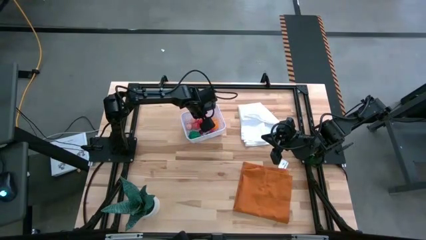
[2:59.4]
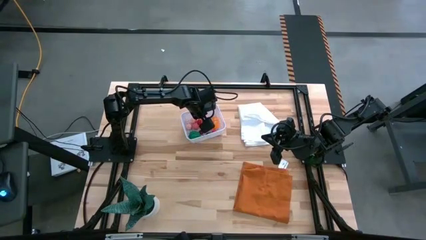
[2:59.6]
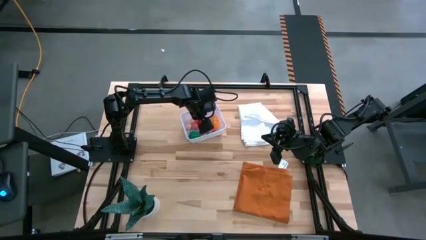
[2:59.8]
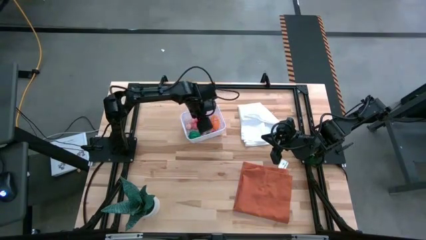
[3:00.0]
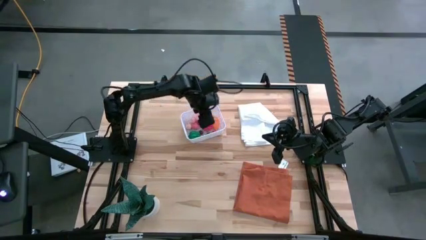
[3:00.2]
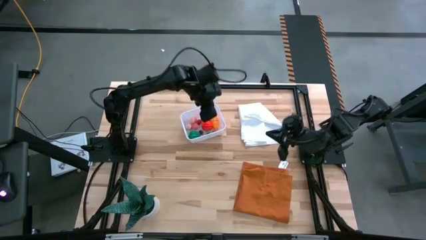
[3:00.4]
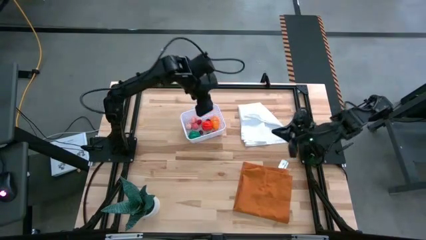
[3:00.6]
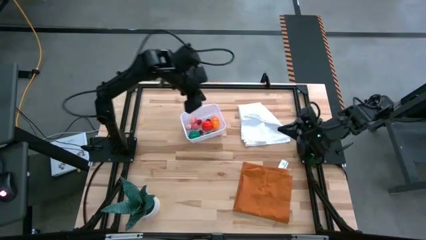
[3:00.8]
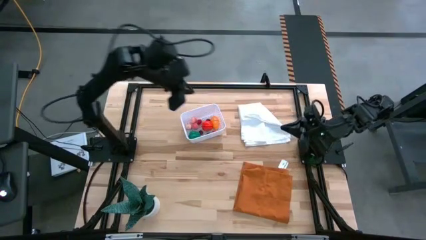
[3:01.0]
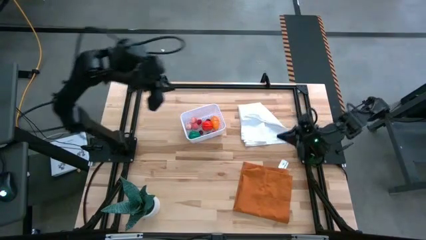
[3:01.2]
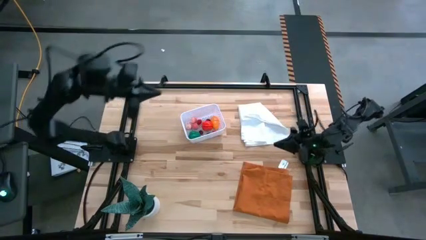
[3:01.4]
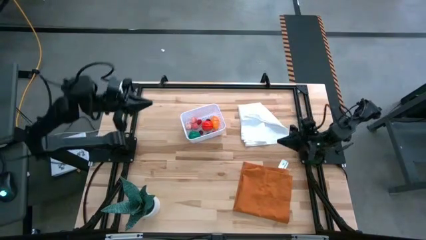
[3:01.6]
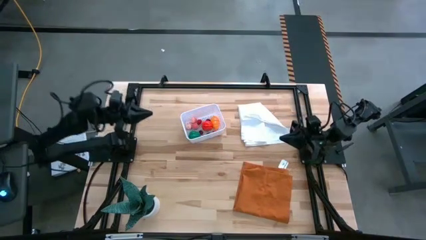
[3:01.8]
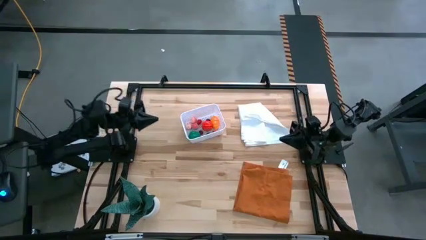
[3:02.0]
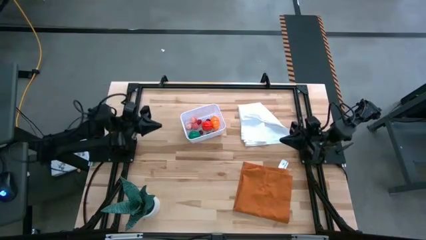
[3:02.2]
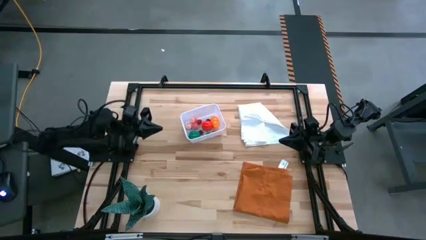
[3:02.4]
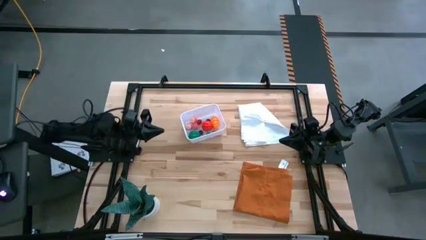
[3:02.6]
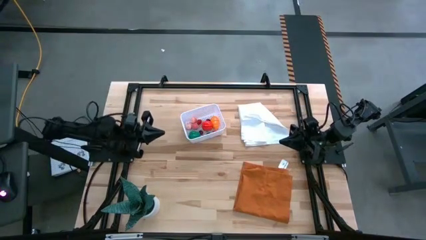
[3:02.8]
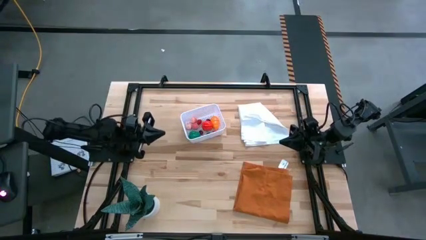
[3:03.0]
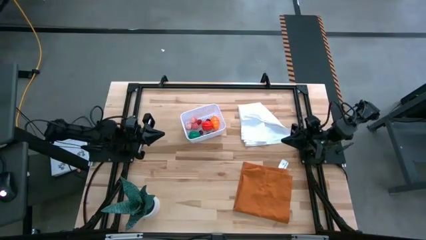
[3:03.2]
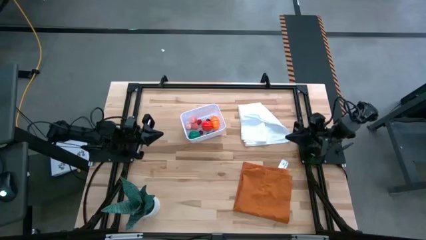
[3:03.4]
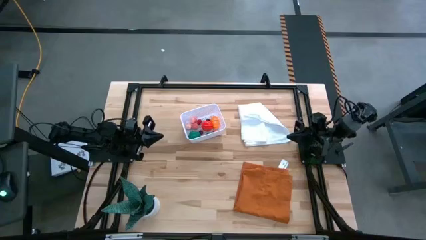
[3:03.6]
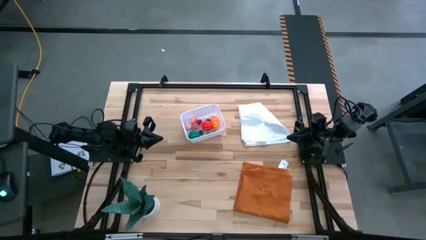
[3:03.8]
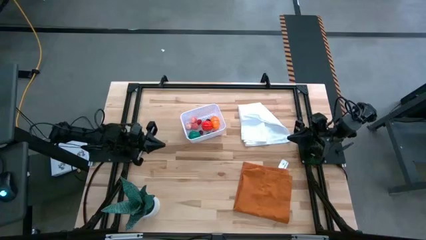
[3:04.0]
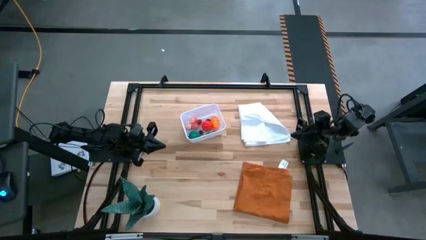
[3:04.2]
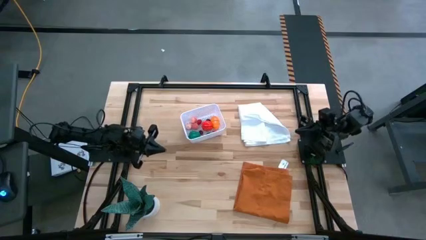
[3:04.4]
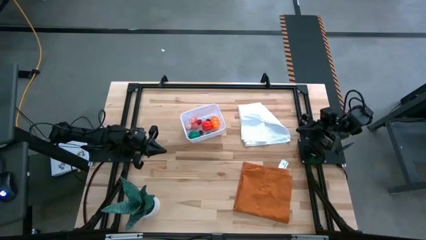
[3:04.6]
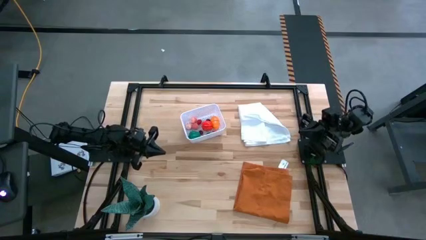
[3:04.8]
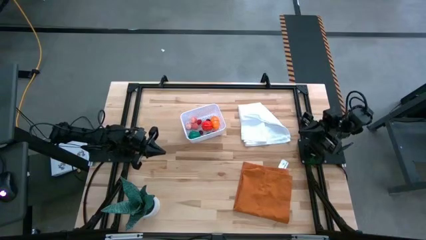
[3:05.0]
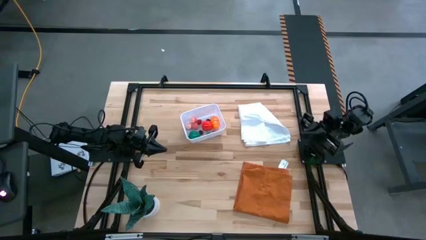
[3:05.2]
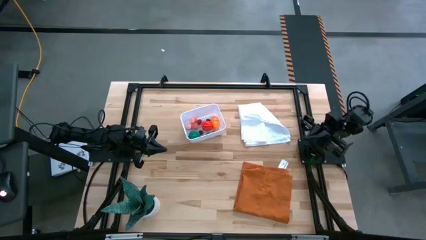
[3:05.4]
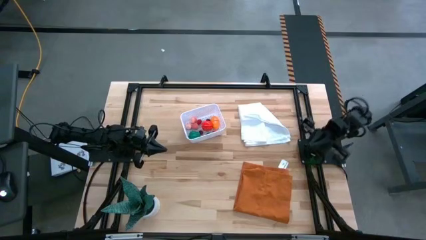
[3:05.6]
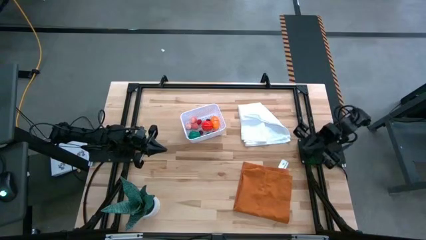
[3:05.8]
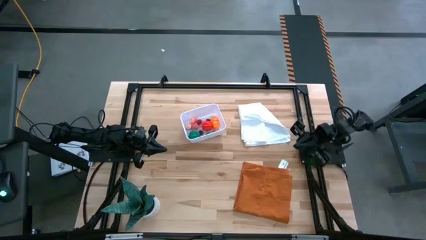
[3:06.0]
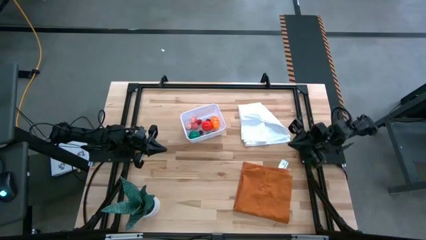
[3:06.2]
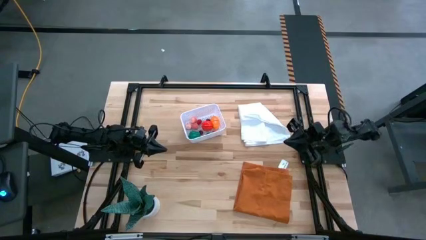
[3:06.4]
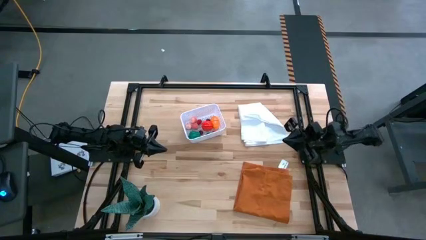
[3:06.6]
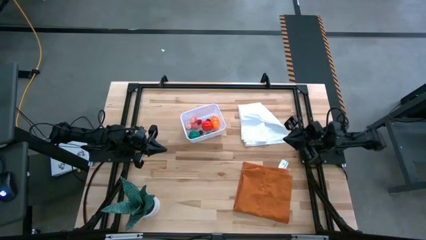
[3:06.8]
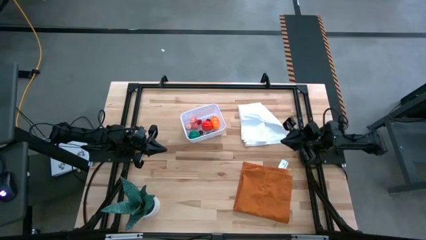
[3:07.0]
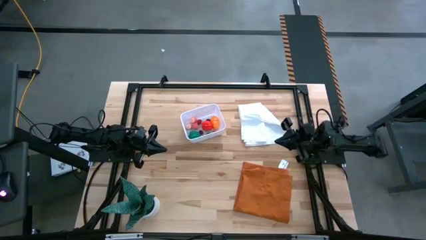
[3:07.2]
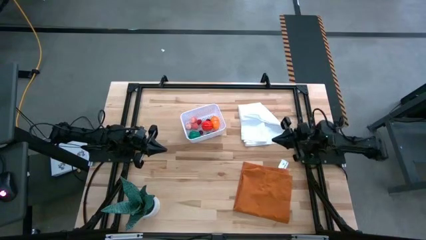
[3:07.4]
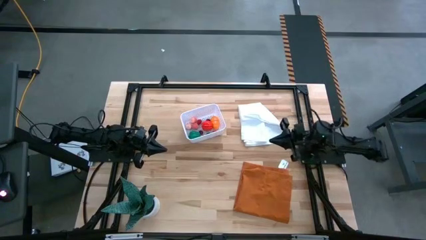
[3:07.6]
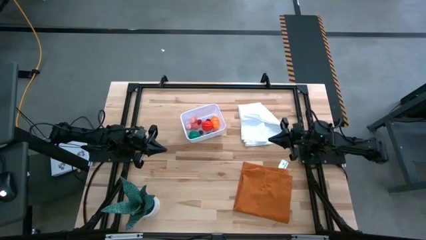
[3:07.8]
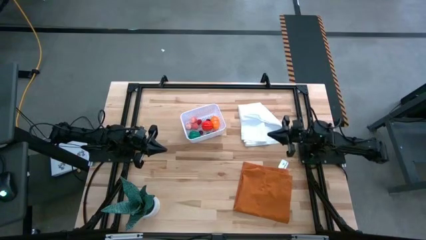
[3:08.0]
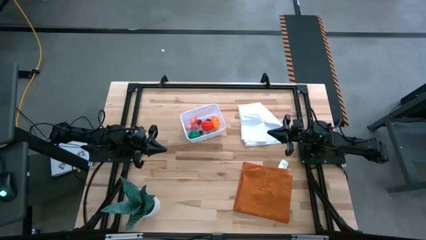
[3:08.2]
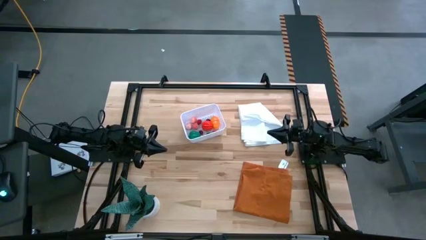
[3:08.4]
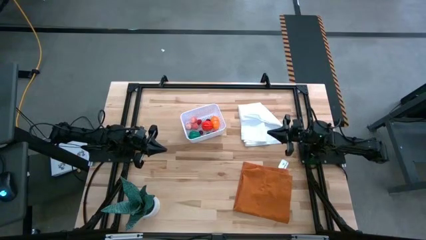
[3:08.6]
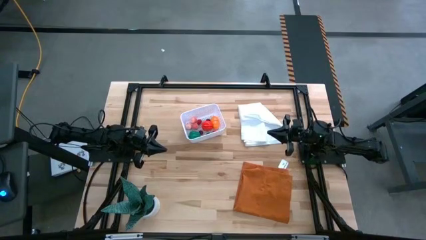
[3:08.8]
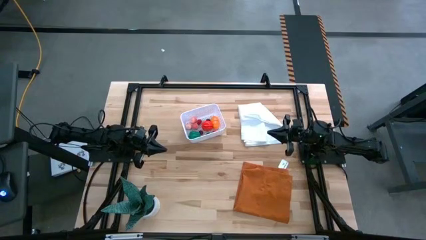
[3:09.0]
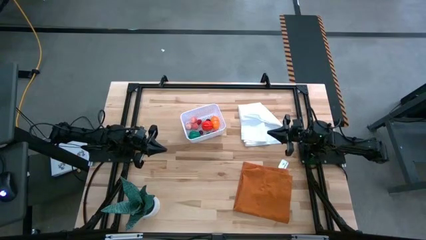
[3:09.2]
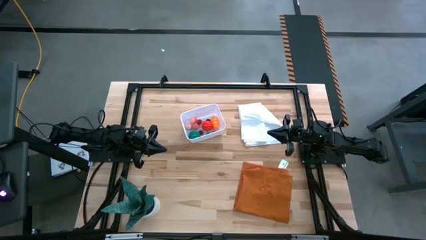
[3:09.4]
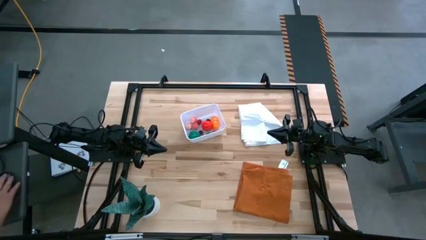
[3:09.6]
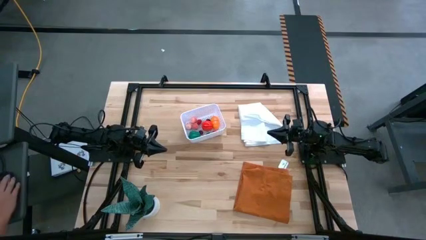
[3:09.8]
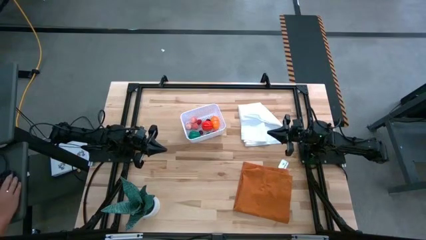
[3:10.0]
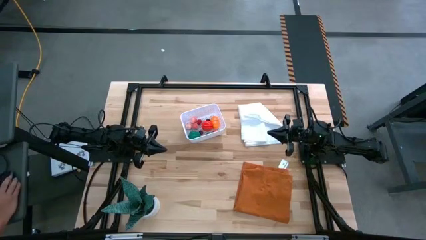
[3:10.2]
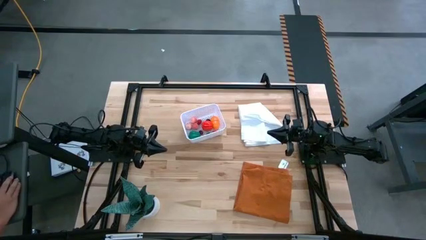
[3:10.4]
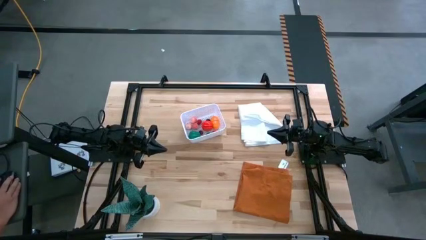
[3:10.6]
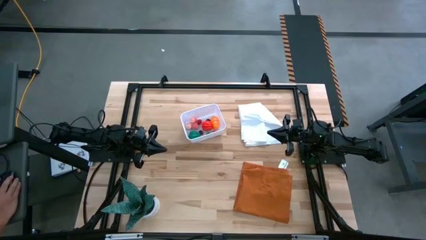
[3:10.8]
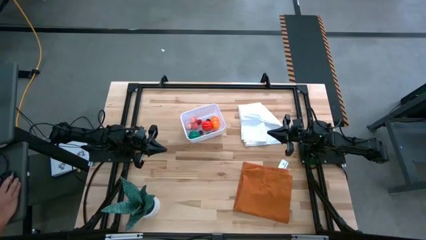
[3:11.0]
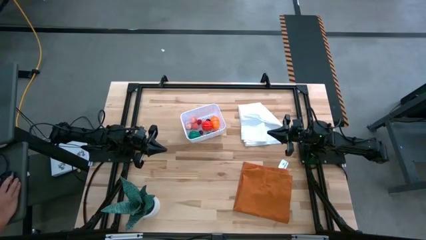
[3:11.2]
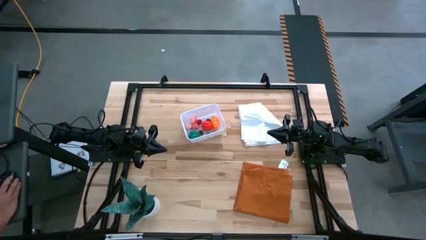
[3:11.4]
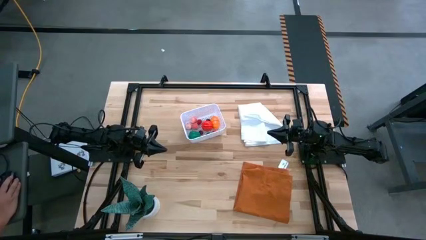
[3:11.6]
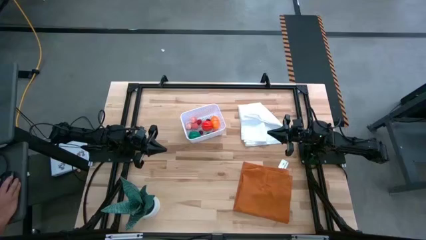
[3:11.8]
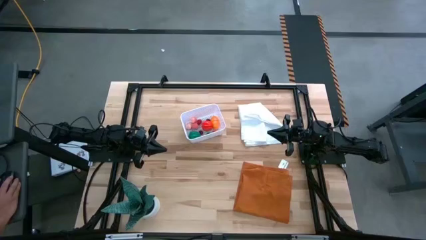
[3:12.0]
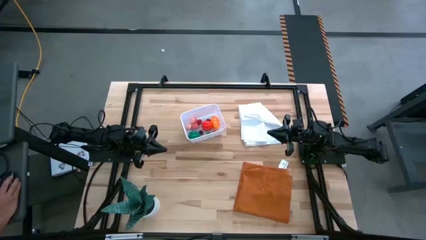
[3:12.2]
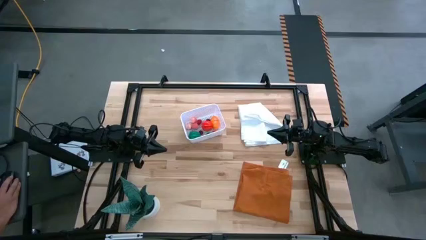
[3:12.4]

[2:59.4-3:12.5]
Task: Pick and placing Produce into tupperware
Return to Home Position

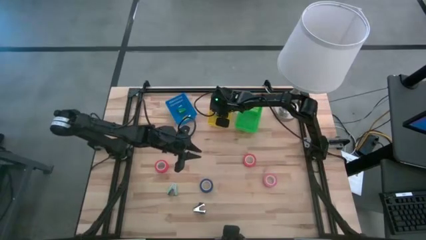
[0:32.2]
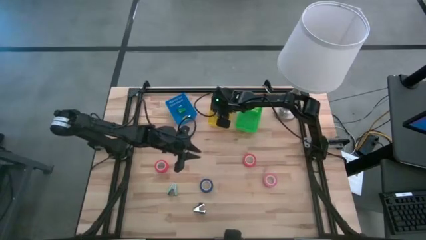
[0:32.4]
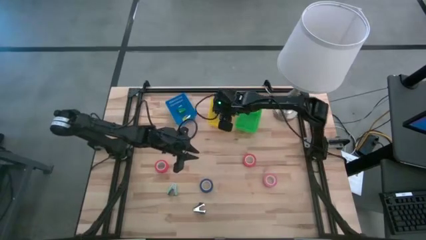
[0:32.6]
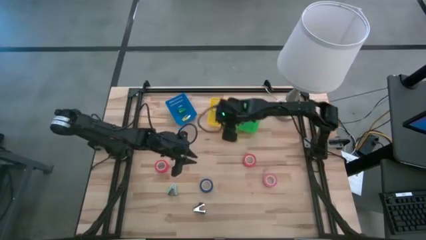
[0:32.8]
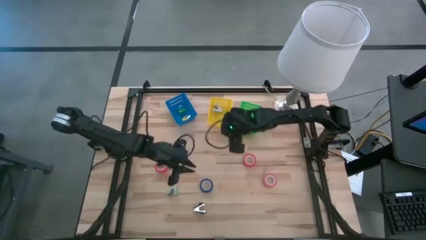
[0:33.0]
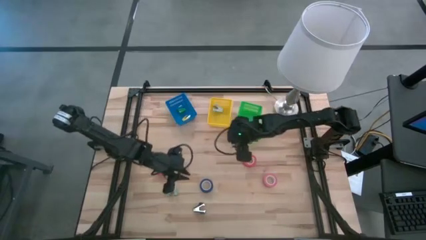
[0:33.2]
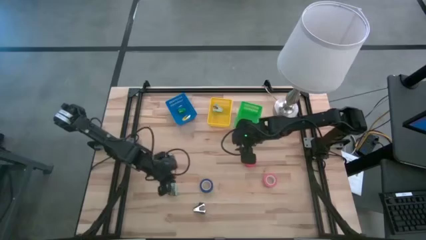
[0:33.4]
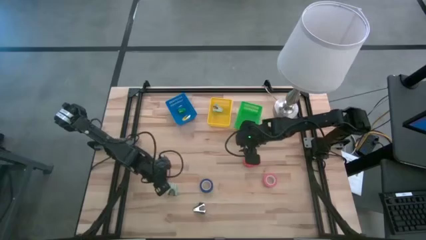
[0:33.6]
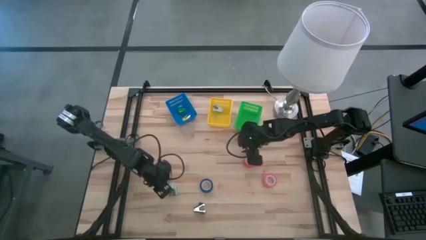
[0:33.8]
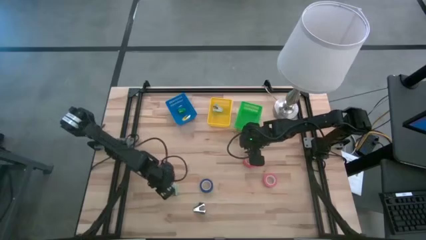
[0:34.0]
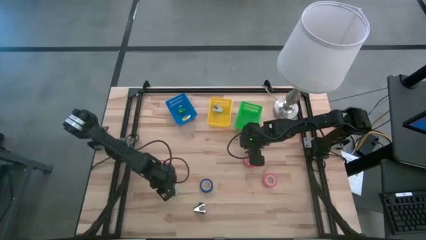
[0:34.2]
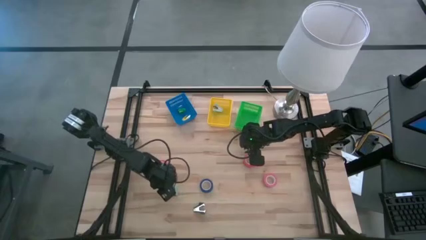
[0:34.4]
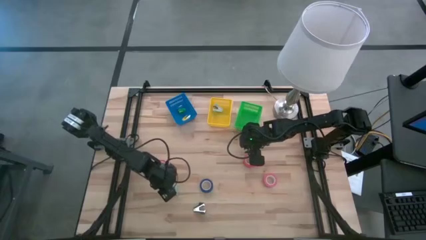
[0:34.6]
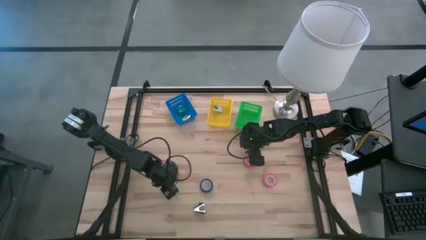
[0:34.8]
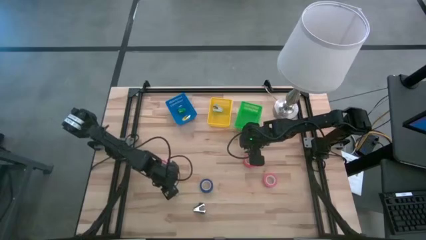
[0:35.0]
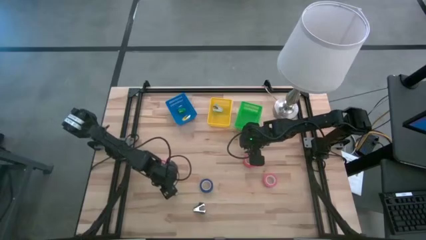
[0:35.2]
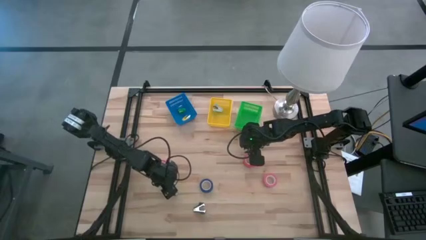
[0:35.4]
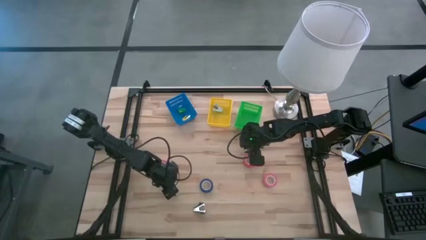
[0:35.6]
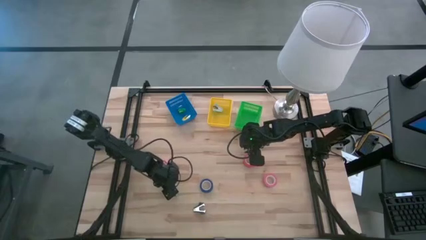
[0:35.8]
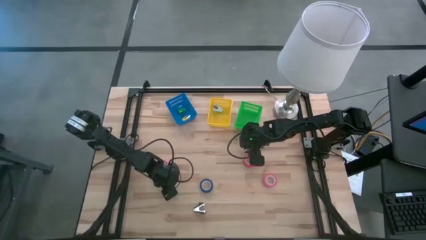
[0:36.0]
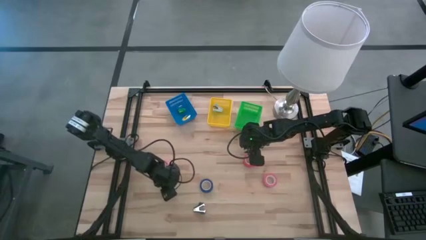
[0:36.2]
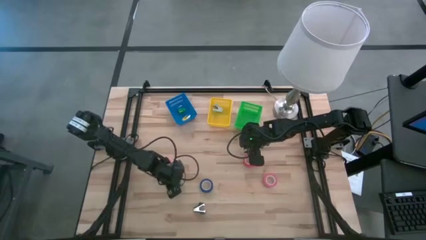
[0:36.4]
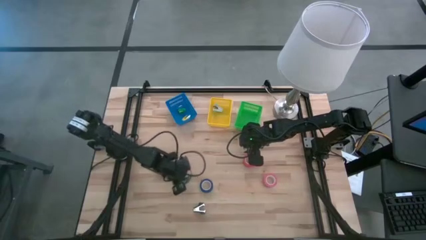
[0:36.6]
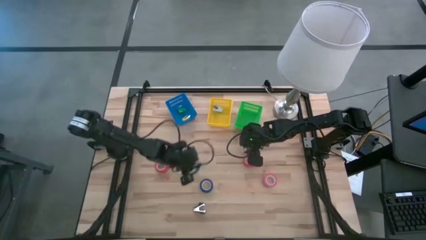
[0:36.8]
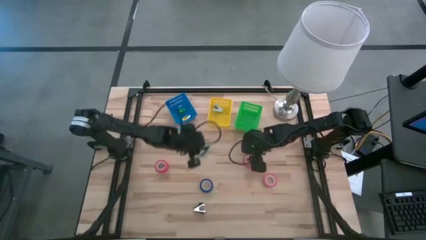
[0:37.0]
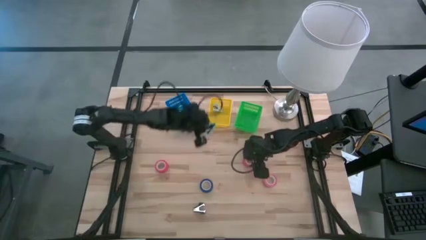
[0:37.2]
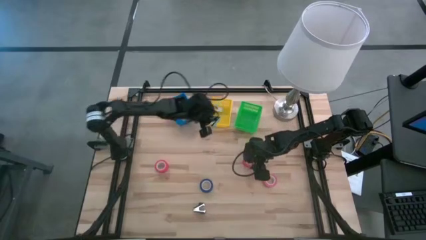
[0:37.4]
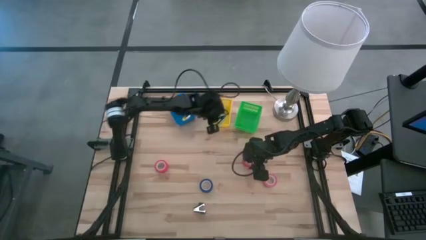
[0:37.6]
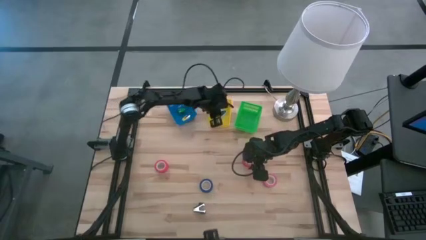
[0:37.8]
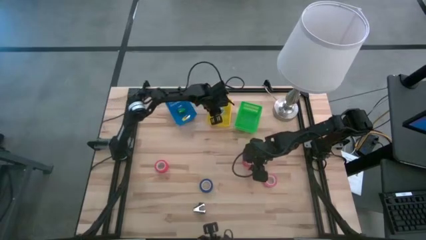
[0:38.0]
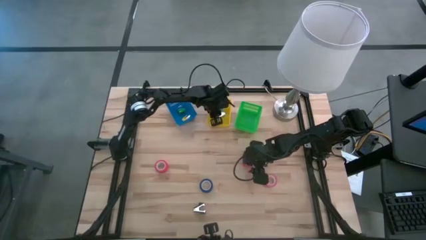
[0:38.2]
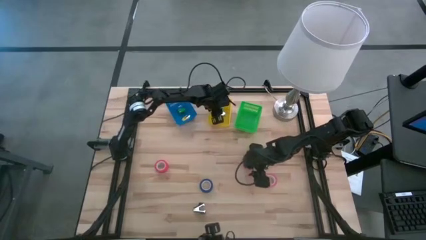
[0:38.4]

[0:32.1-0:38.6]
Task: Pick and place Stapler, Stapler remover, tape
Put the light blue staple remover into the yellow bin
